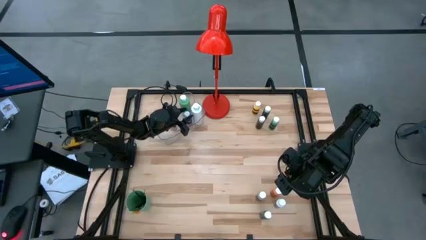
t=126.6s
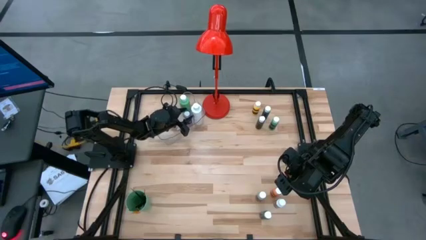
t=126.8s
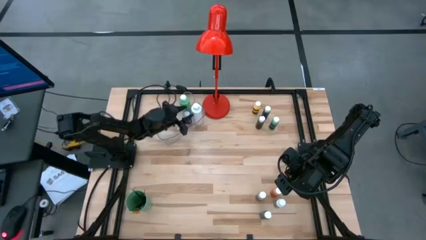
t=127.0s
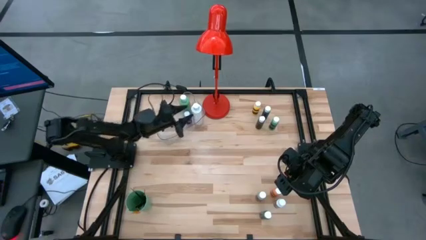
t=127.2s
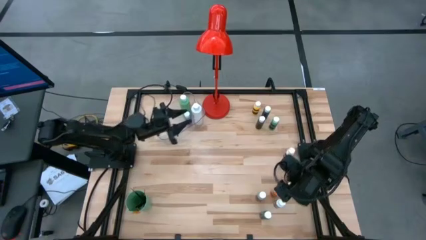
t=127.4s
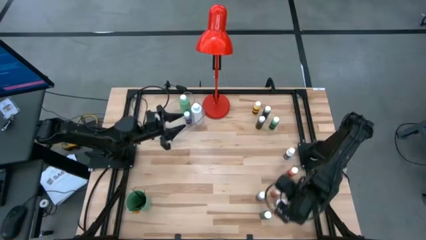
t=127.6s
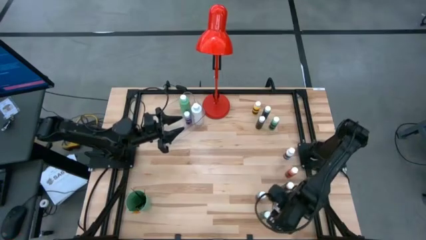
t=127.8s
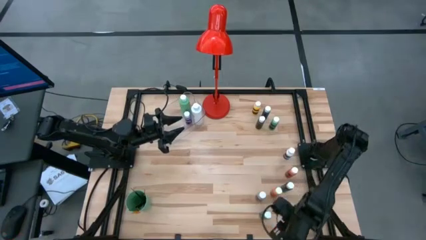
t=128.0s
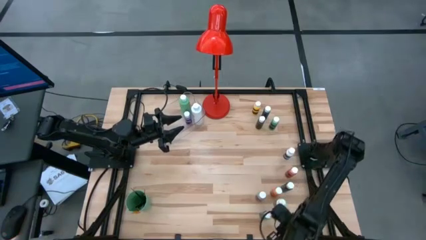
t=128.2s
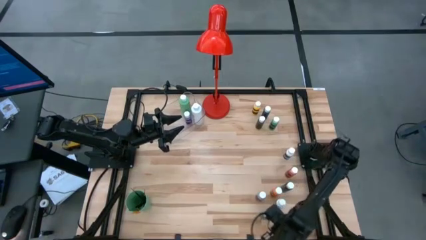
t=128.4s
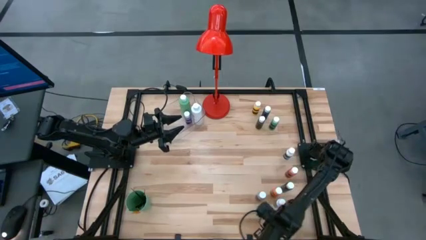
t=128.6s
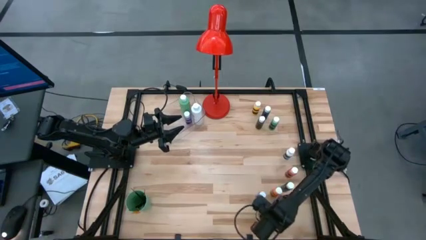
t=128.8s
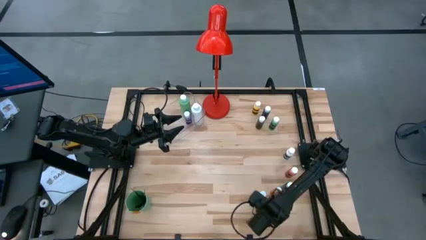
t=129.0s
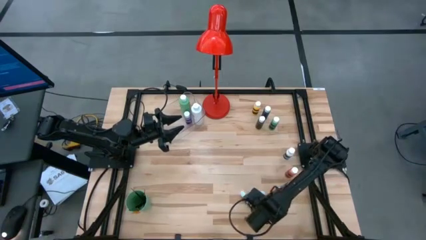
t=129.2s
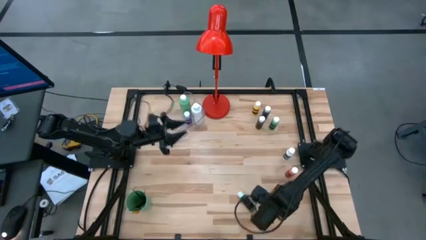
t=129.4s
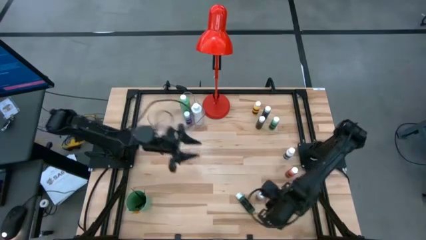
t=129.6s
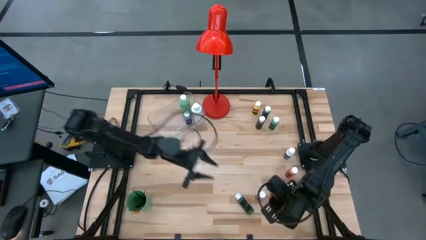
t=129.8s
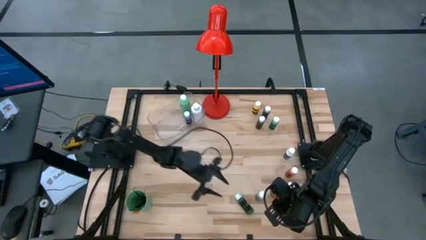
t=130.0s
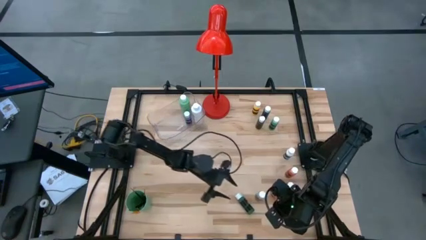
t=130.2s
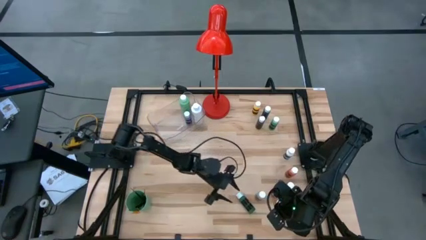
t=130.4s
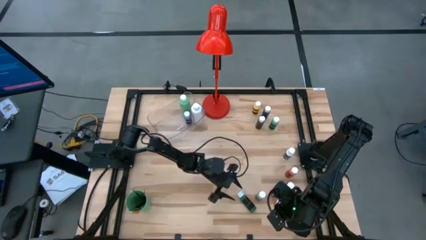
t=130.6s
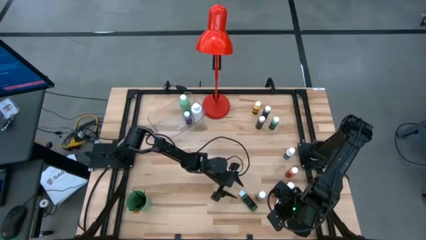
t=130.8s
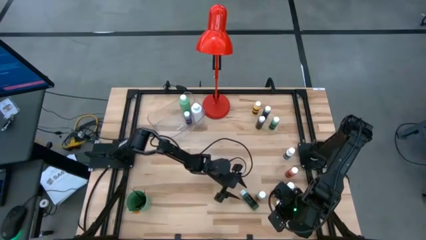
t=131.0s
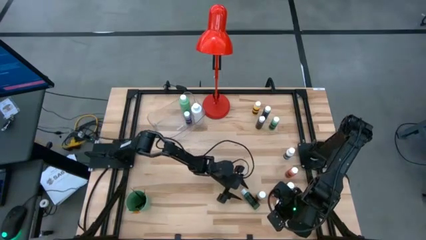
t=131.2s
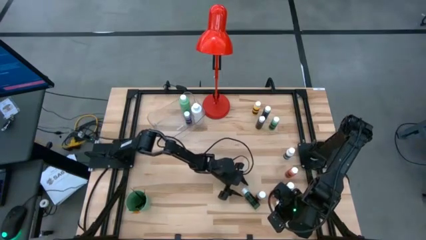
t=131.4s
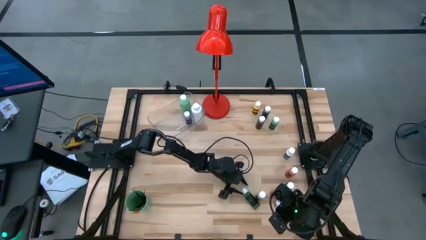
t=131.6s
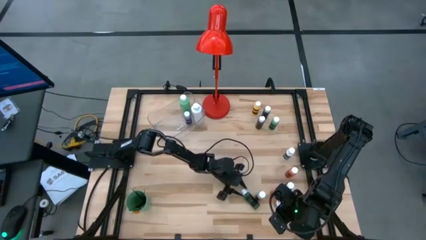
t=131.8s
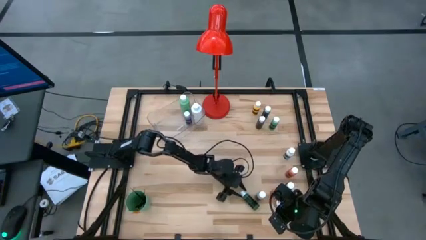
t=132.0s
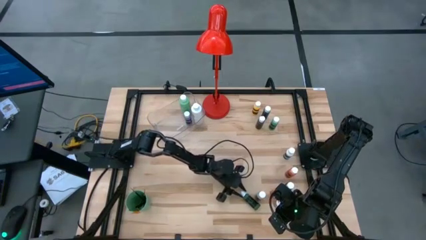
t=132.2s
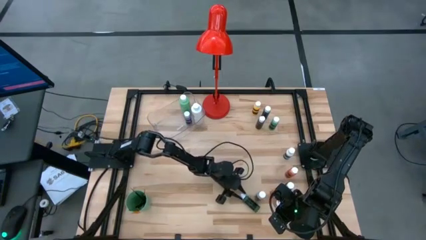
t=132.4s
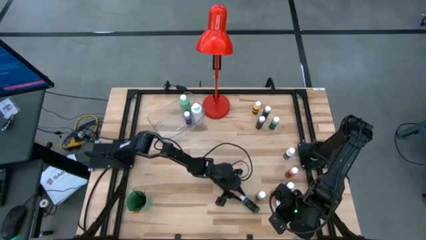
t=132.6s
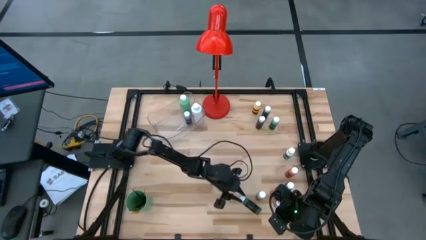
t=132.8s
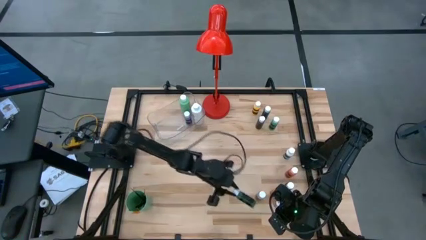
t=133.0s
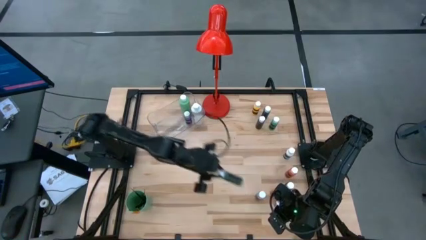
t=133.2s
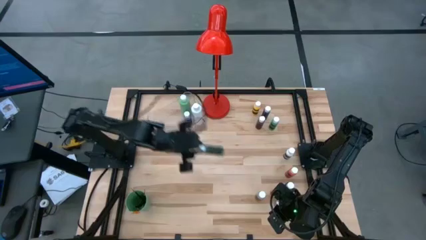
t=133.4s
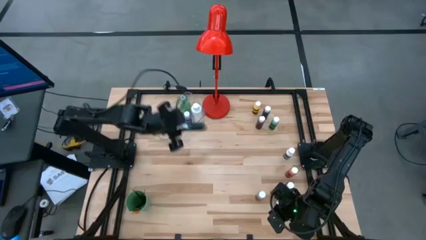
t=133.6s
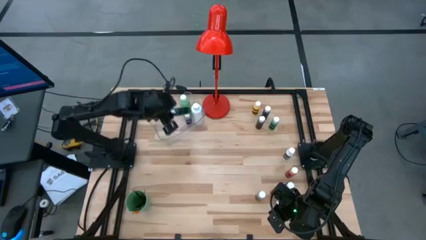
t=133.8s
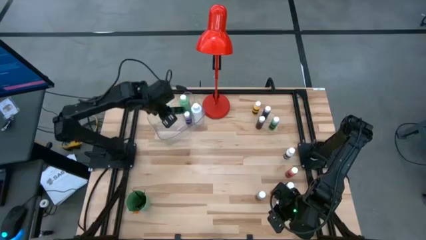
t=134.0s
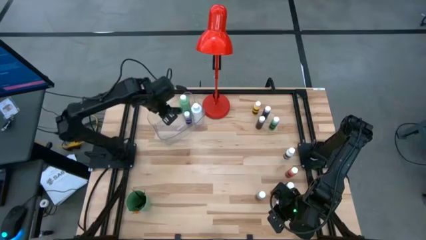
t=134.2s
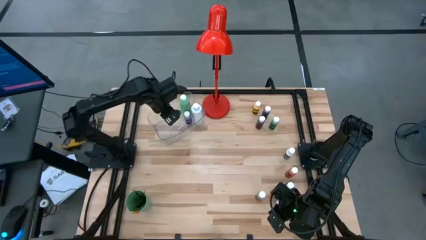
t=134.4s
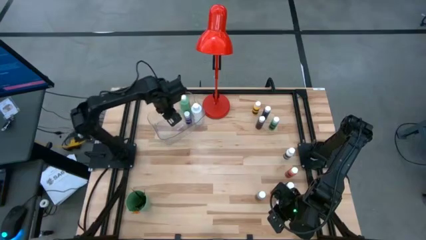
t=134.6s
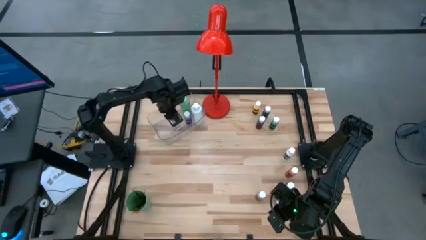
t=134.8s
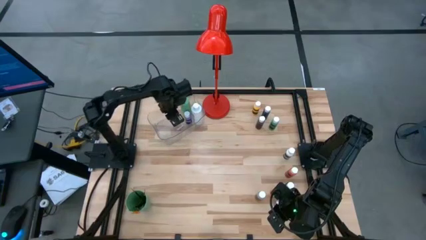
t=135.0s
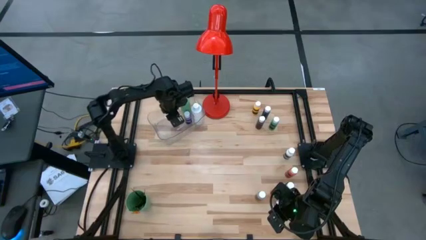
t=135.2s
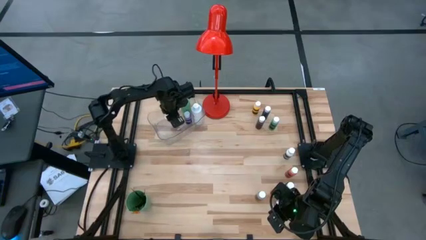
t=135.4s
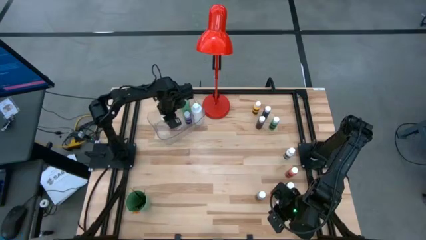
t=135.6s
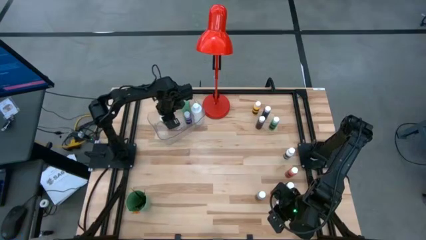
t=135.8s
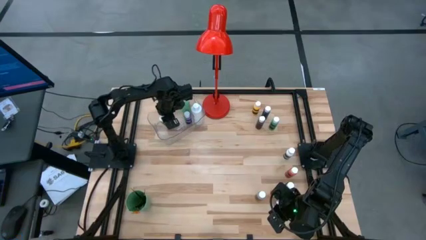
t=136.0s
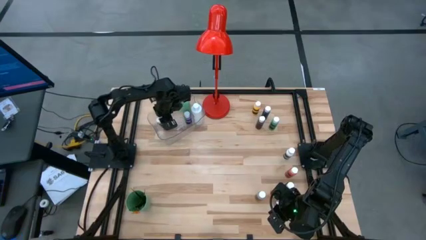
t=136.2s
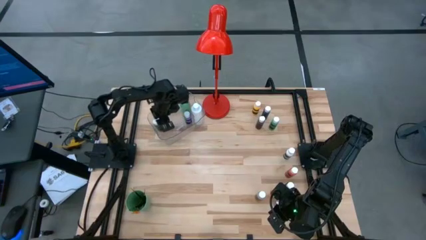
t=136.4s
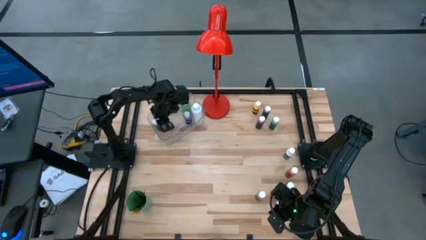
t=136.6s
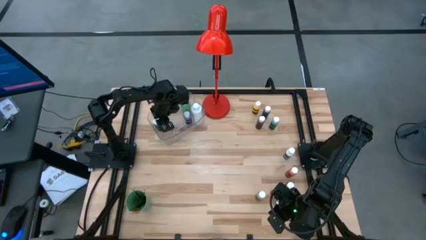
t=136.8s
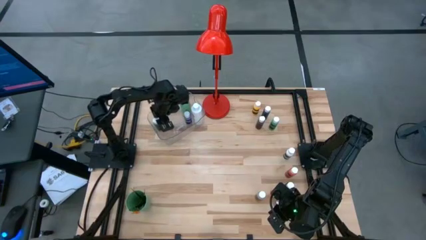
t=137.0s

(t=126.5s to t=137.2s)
Task: Pick & Place Paint Supplies
Put the green paint bottle into the transparent bin

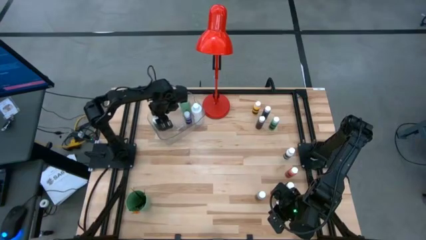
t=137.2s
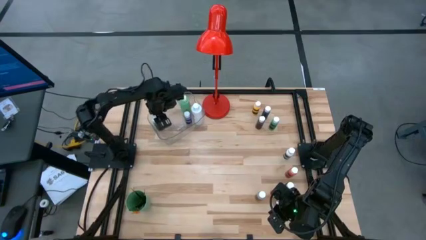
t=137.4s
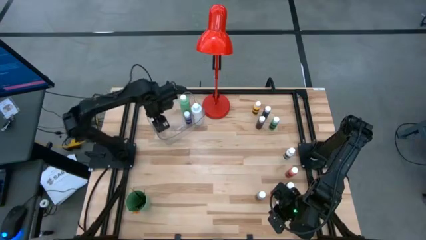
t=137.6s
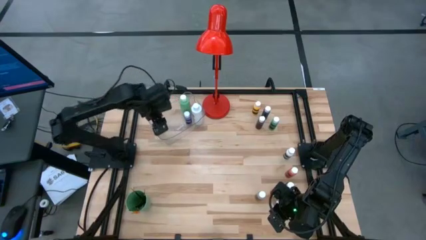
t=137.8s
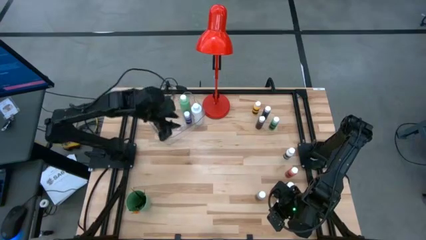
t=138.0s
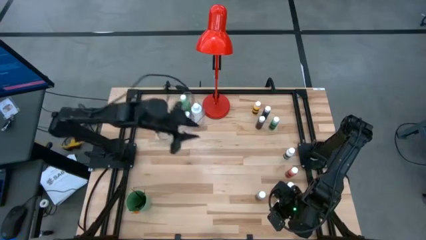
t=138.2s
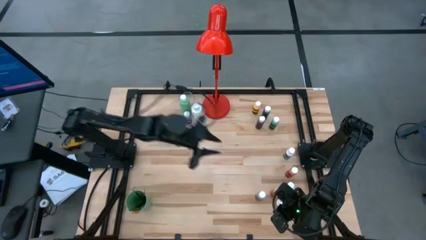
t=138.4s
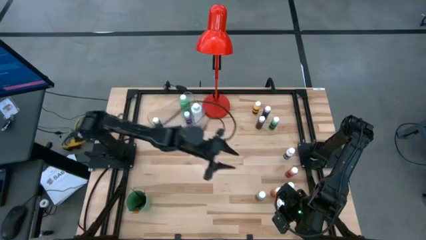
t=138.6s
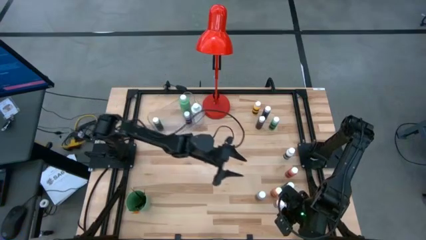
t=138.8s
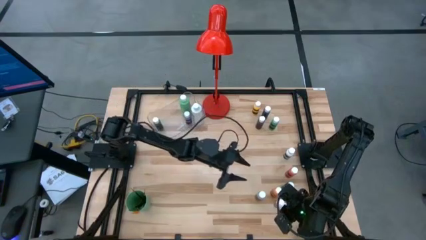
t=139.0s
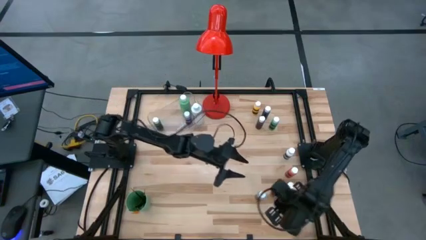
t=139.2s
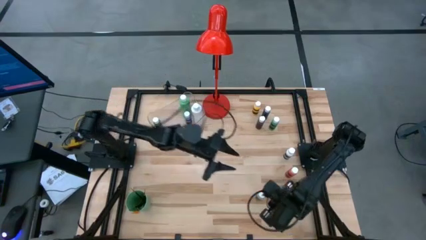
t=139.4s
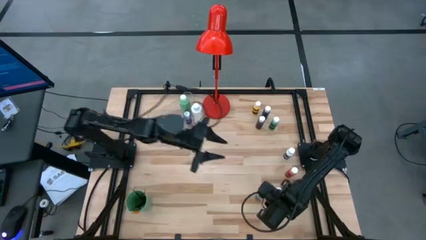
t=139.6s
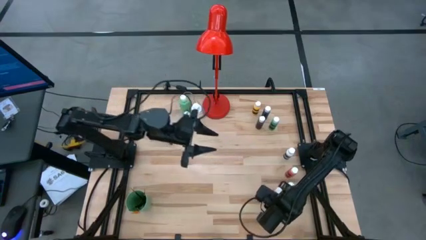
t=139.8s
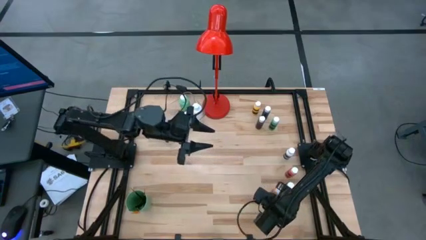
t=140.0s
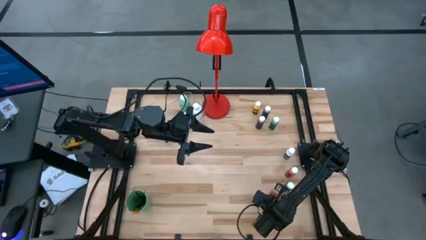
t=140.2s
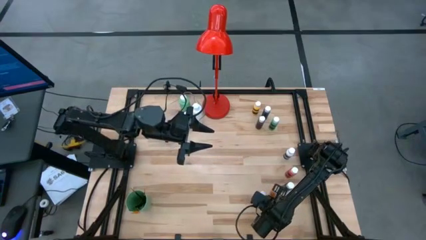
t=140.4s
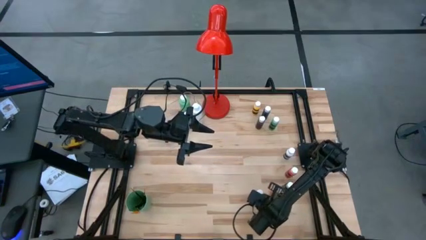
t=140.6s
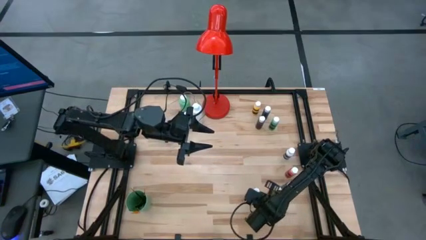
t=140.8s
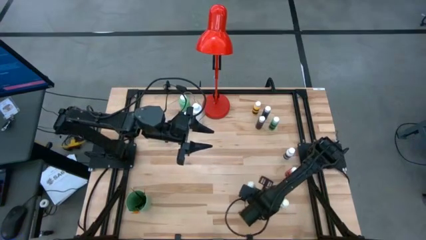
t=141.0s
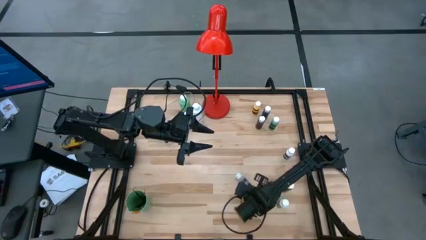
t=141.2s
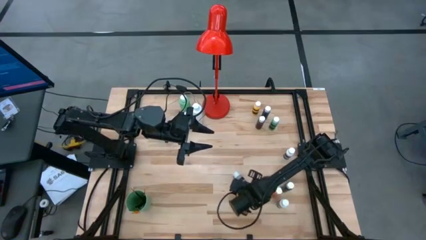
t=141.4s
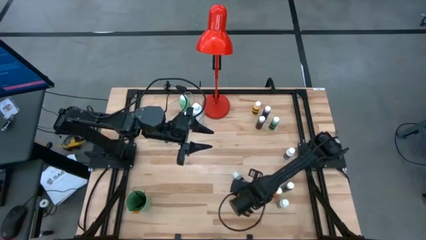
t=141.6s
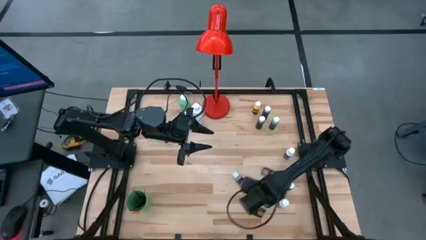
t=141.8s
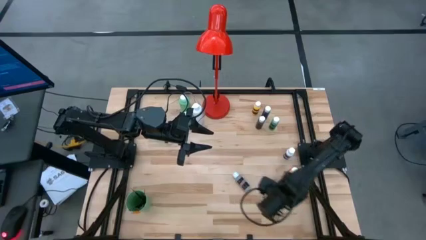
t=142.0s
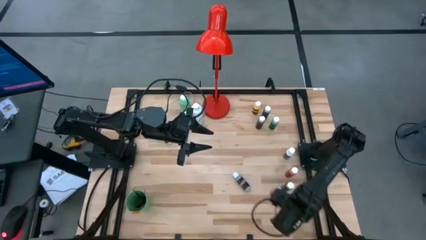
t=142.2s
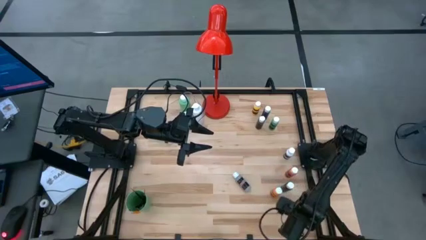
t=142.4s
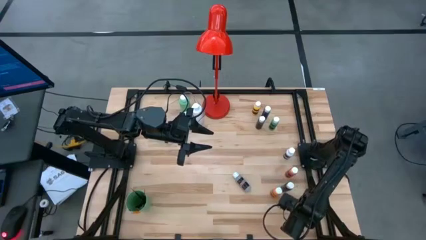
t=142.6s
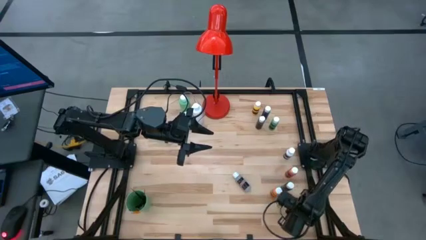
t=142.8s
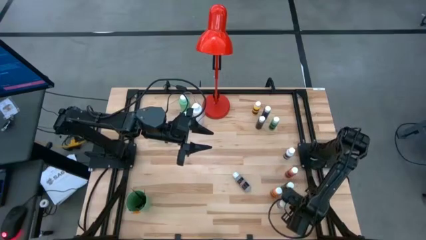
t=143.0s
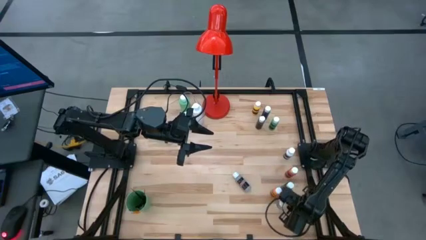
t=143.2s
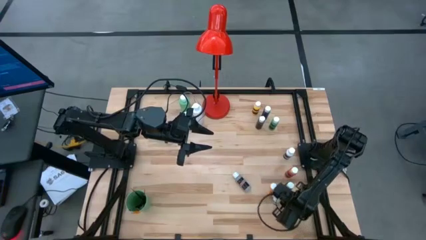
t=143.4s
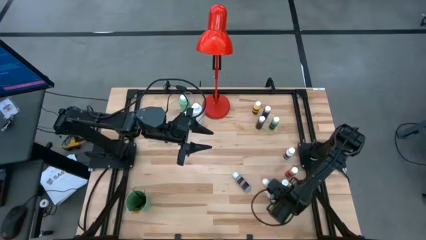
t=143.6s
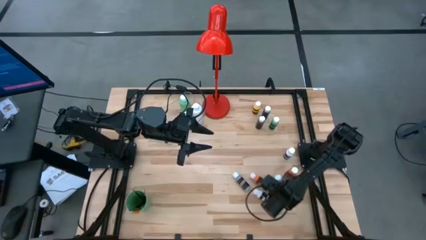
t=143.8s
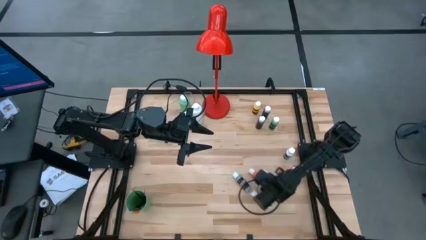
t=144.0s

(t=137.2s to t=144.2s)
Adjust the paint bottles on the table
